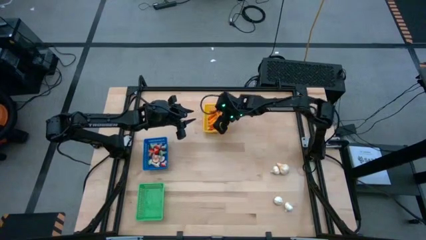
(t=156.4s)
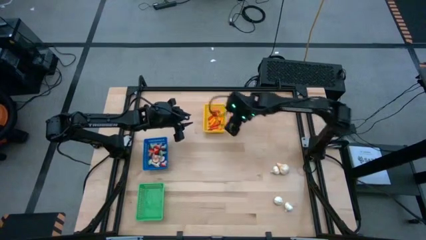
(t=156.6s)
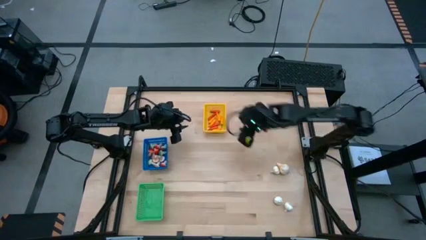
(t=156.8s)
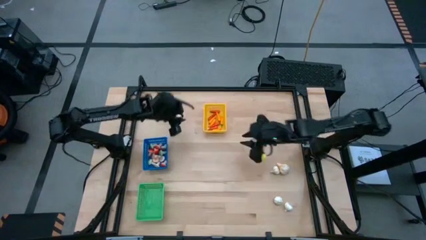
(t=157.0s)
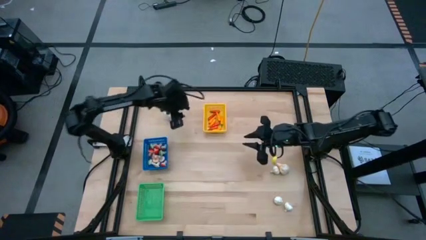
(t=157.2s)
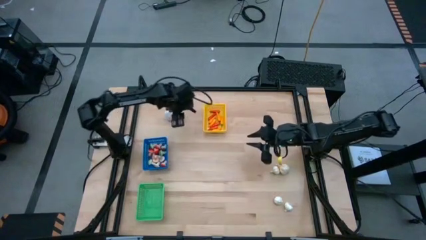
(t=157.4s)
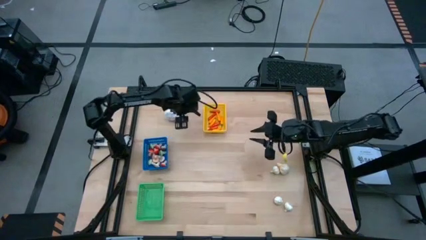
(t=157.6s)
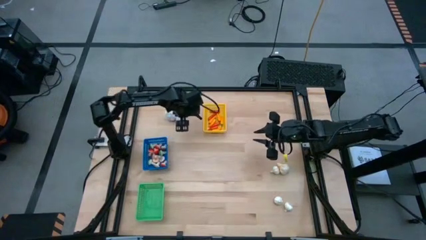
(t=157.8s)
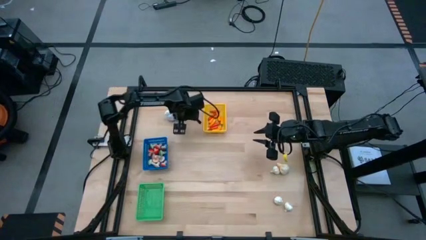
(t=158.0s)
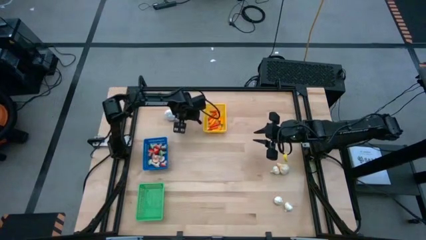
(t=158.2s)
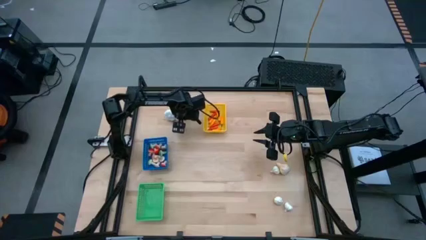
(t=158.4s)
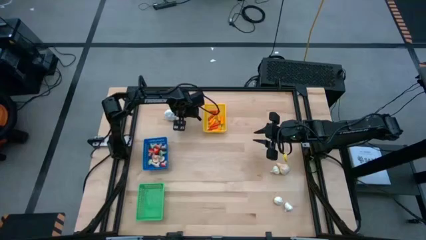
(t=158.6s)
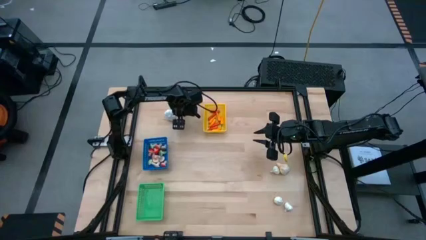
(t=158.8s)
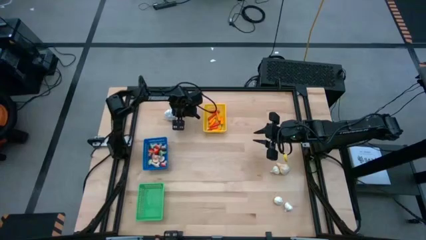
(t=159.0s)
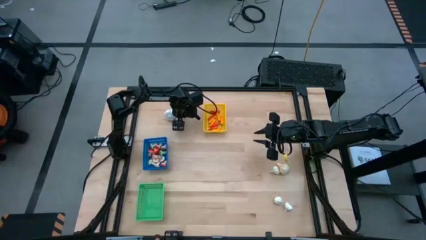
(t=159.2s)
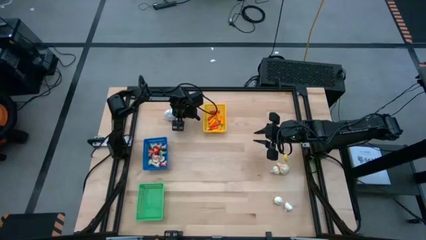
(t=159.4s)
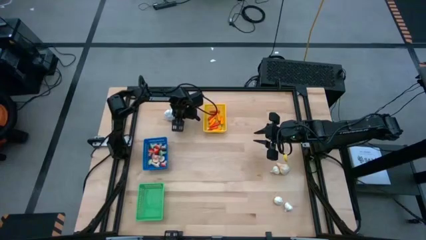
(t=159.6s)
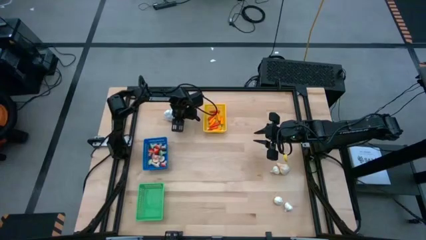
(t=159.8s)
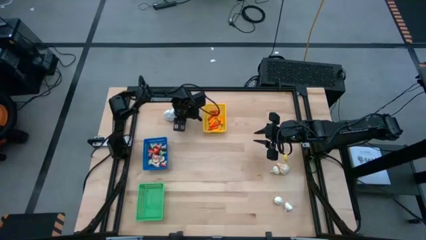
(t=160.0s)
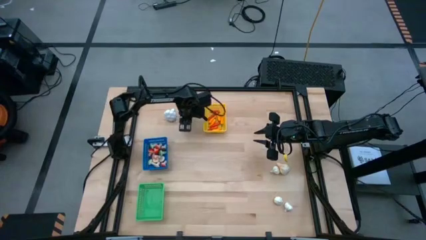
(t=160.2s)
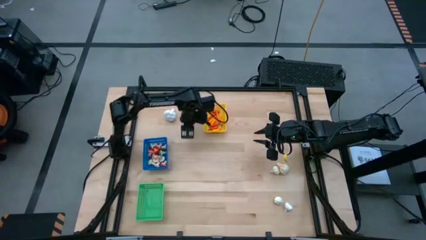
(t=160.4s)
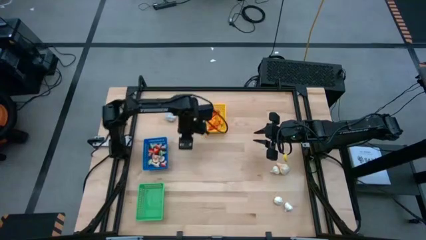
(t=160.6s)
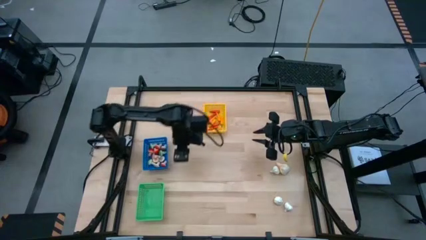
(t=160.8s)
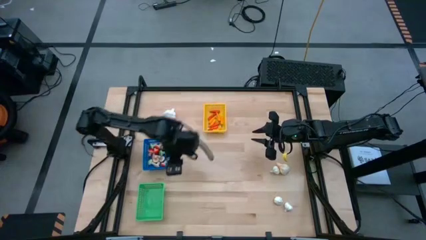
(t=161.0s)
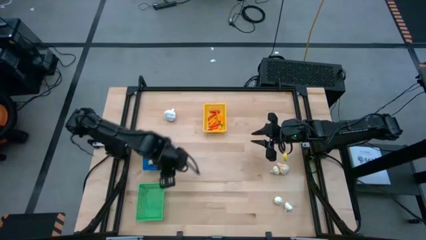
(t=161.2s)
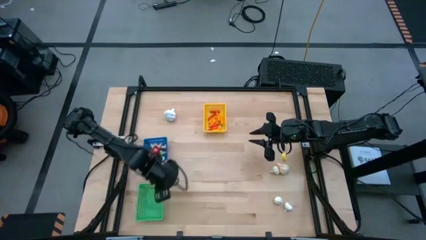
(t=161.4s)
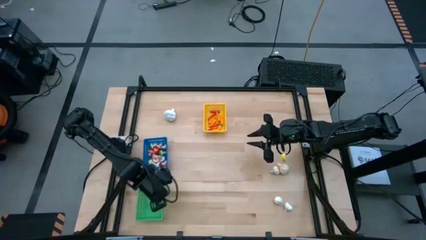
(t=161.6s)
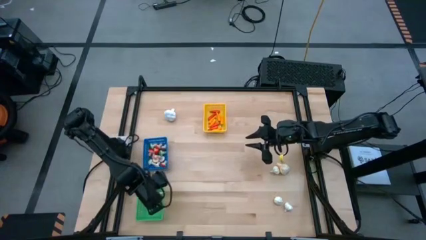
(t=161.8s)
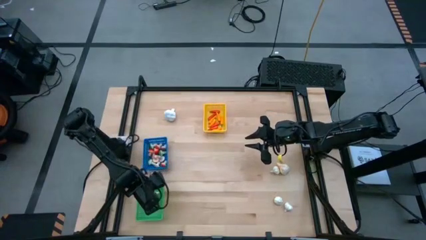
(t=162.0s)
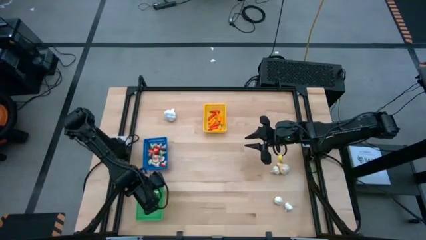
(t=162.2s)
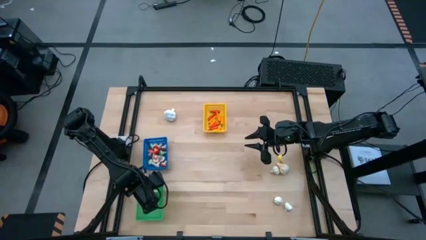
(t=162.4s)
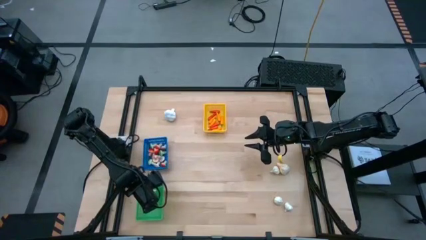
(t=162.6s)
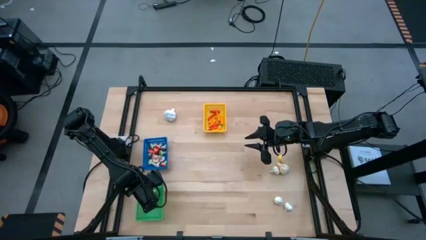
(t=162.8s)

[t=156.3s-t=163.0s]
Task: Sort produce into baskets
Put the garlic into the green bin

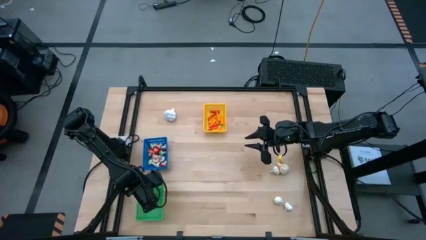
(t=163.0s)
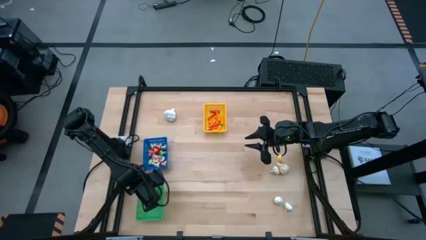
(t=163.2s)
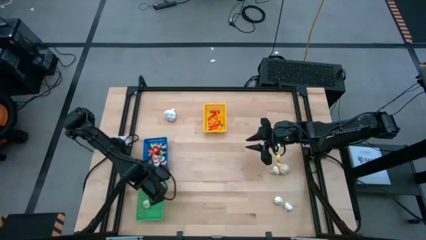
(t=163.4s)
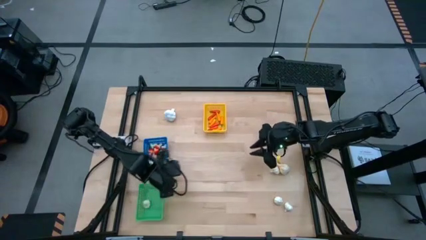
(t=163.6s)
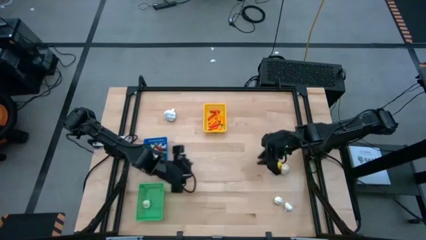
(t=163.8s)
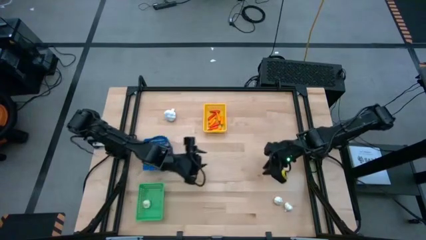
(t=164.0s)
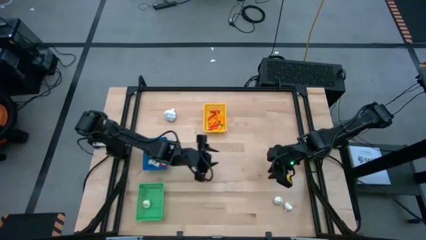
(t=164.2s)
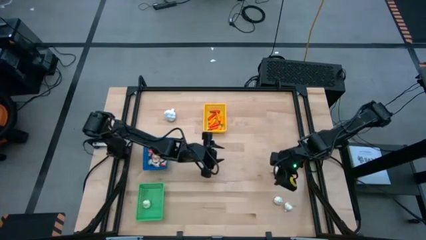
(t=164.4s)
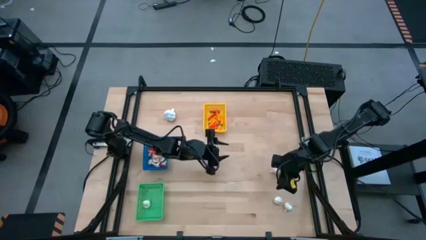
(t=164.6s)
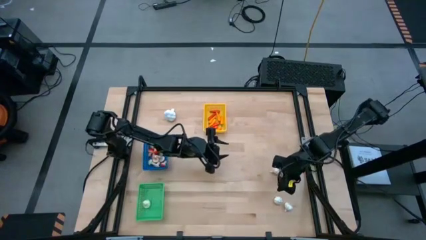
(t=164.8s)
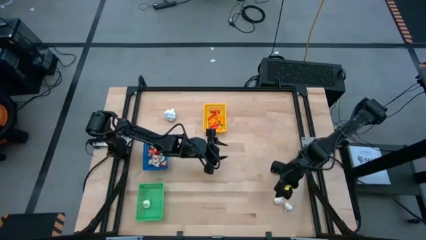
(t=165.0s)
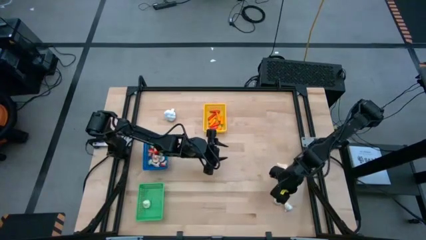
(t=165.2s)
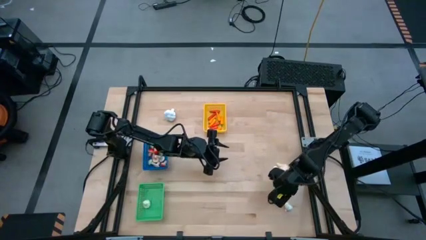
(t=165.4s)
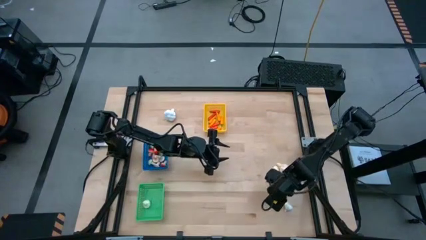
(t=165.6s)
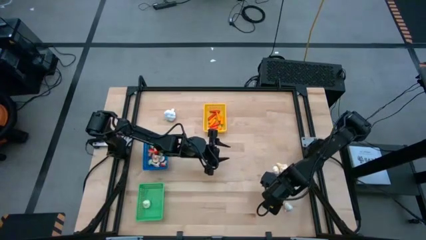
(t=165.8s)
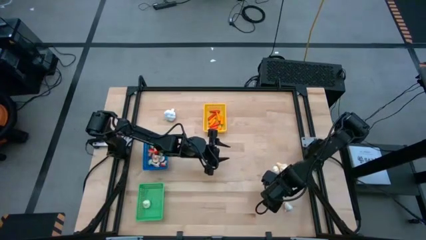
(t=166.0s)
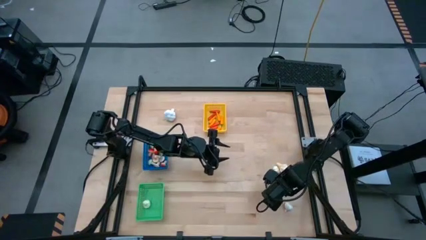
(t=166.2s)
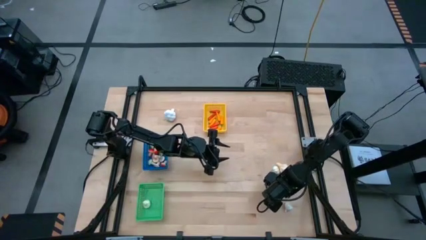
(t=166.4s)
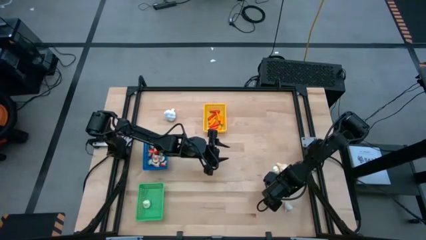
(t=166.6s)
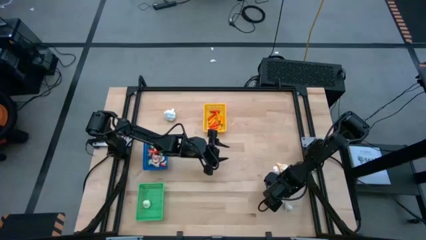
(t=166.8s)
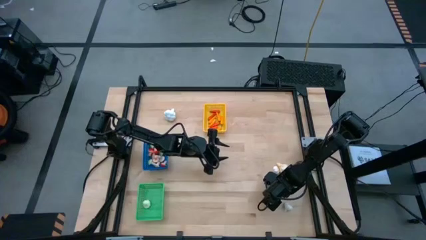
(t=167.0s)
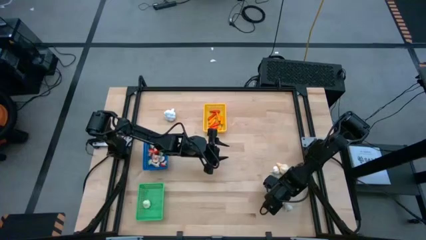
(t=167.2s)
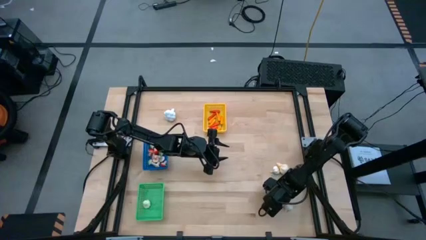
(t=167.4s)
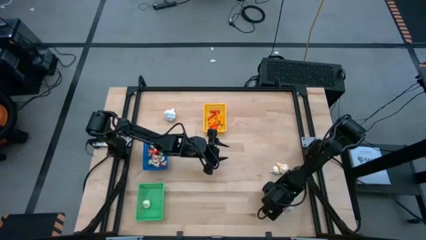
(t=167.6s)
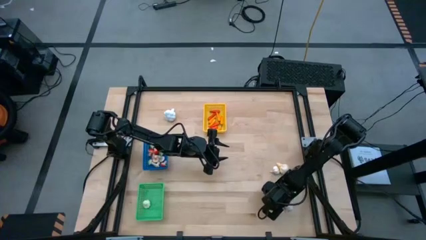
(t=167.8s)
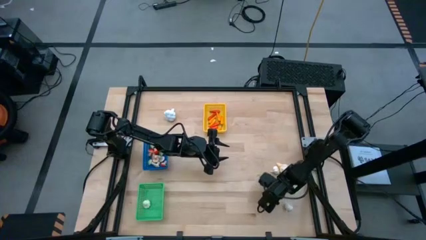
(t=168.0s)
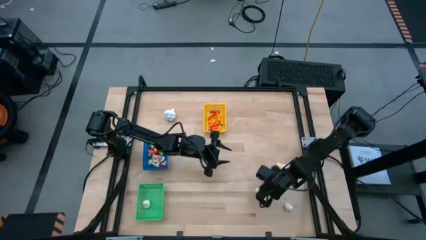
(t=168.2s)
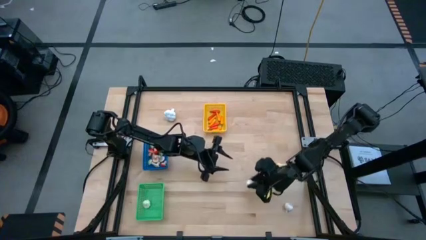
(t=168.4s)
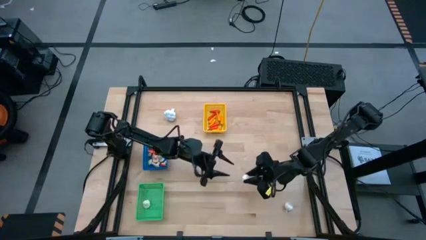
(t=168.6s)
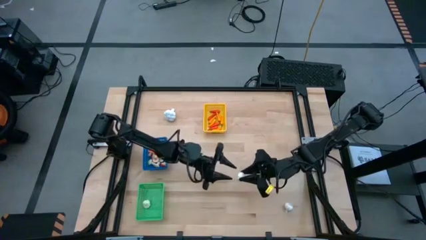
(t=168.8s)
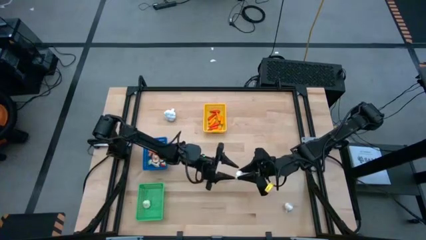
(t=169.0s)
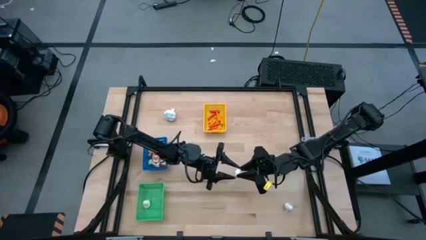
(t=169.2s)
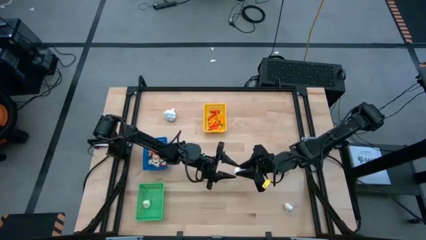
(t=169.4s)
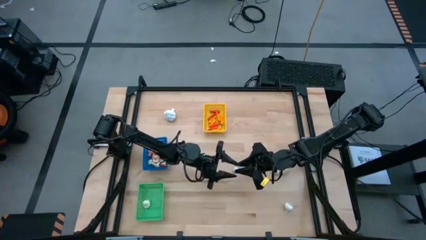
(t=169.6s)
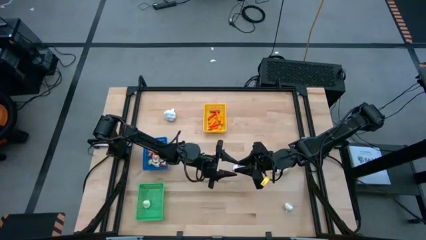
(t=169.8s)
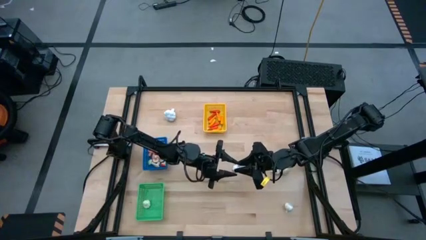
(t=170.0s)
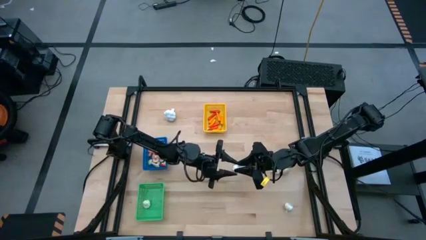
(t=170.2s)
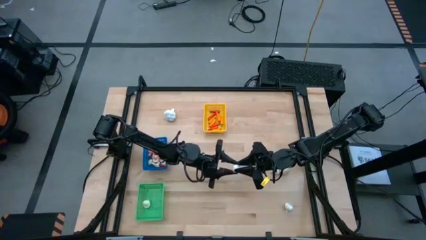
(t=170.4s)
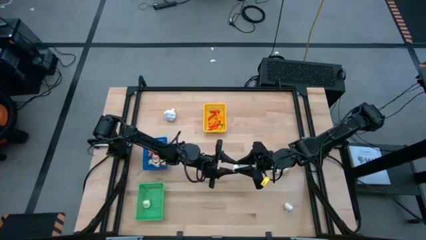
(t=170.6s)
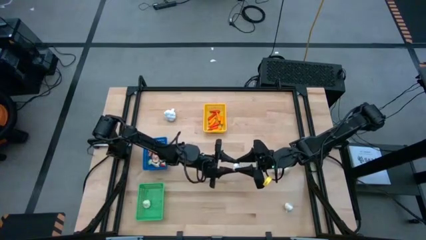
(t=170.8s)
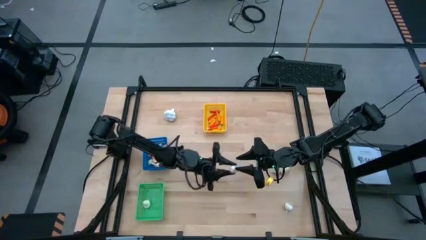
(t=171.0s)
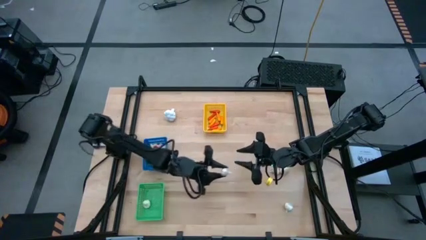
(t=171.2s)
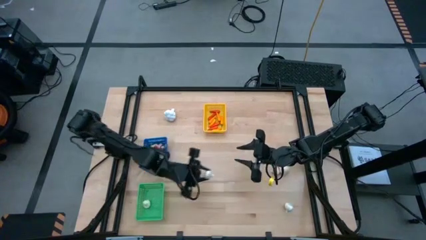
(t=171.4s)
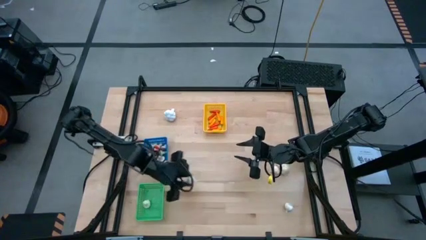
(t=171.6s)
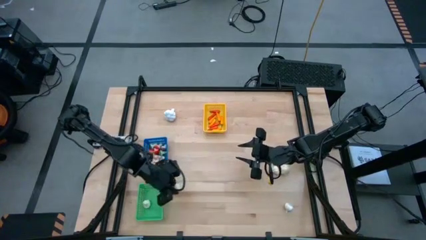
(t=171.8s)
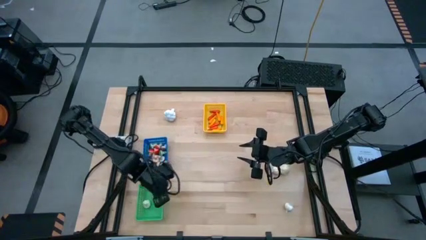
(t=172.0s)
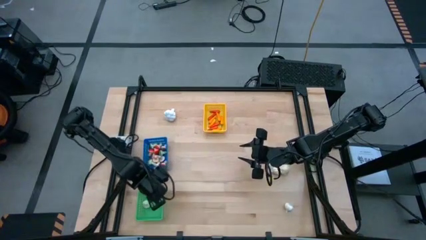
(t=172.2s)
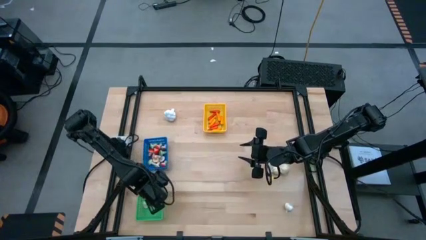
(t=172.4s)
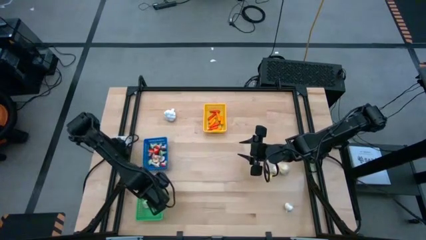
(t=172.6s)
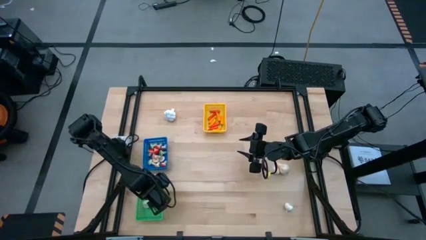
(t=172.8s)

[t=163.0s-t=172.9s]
Put the garlic into the green bin

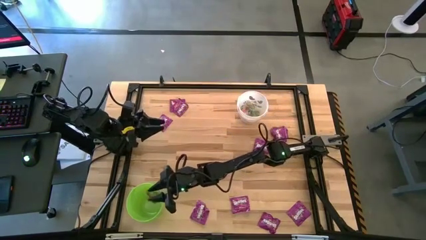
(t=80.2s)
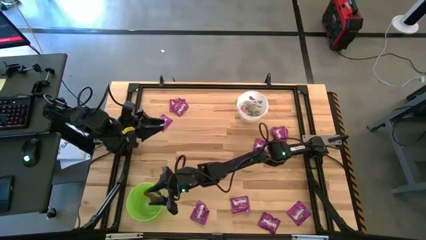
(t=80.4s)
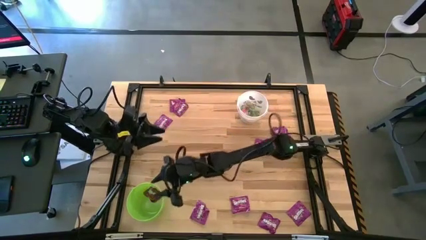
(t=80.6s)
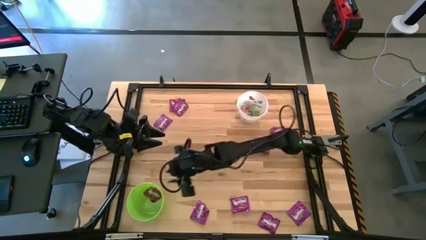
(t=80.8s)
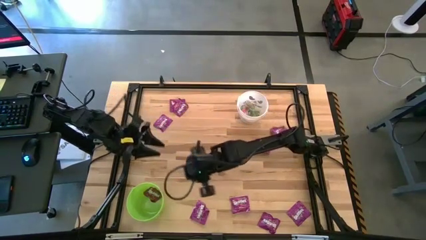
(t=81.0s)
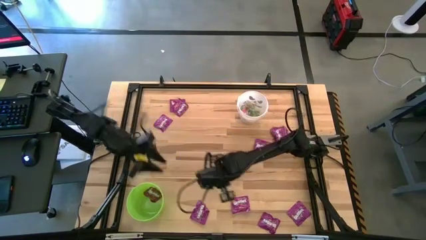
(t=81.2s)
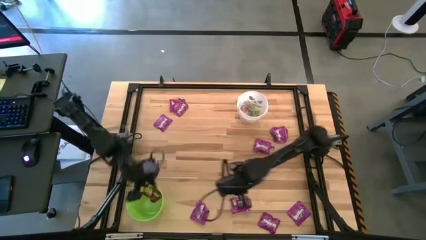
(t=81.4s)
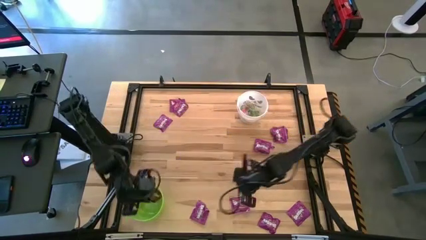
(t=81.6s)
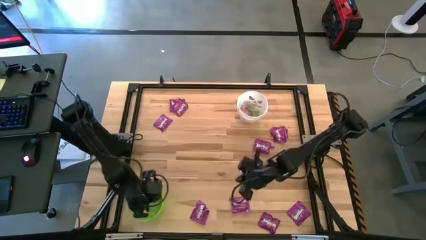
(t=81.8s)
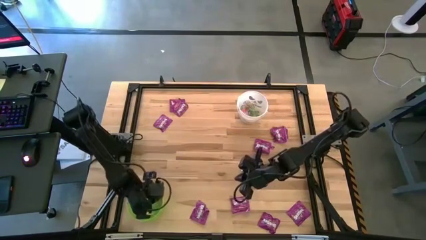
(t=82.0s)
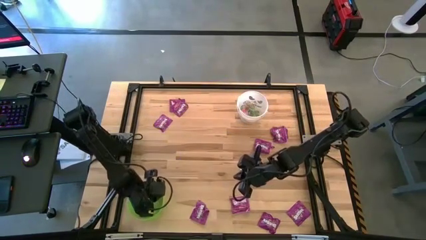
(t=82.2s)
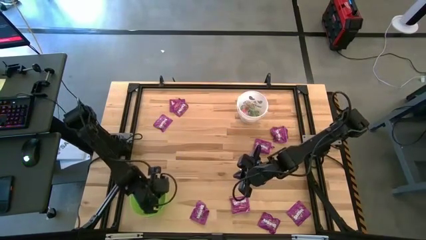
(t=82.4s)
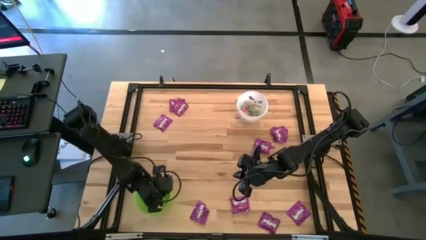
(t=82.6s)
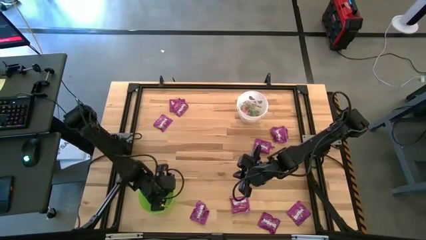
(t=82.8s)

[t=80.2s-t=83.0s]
Task: Sort candy by brand, put in halloween buckets
Adjust the green bucket
